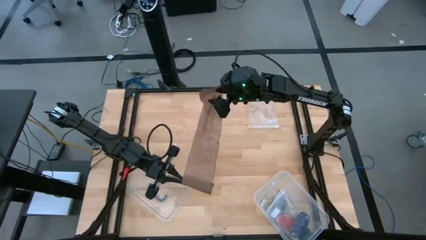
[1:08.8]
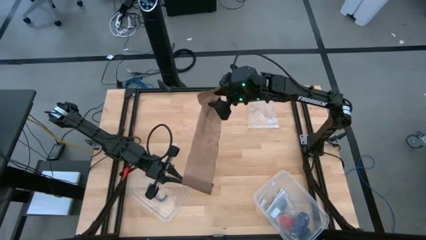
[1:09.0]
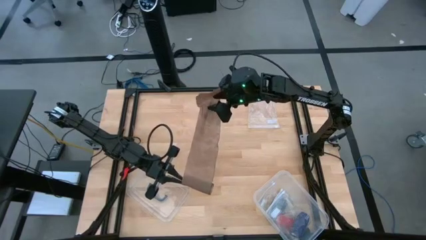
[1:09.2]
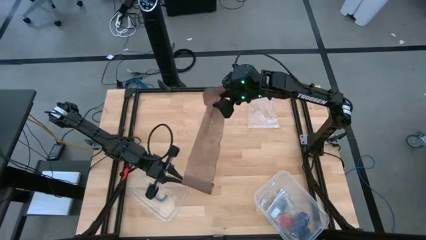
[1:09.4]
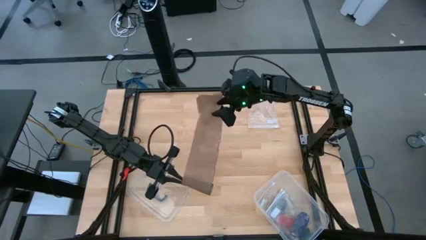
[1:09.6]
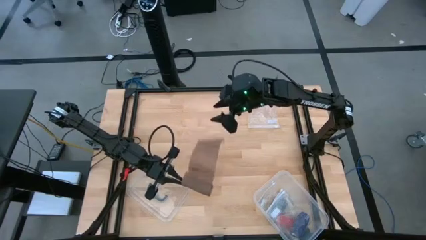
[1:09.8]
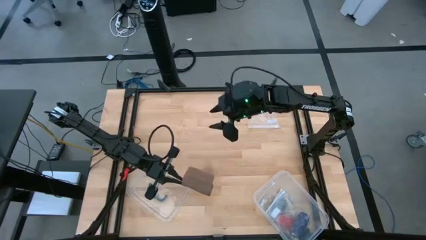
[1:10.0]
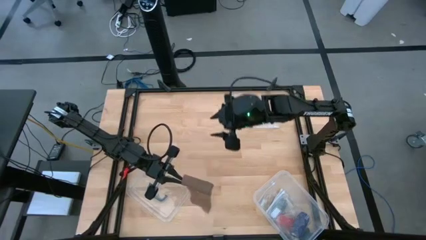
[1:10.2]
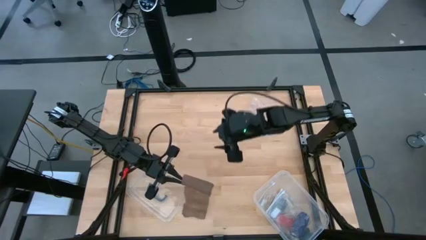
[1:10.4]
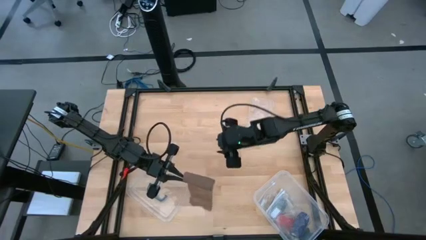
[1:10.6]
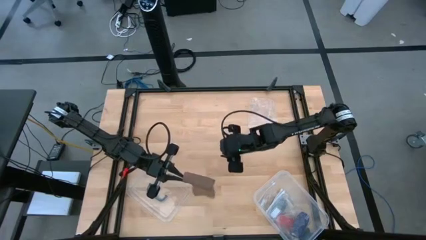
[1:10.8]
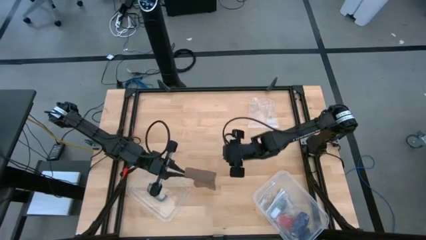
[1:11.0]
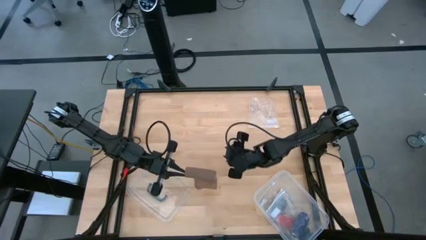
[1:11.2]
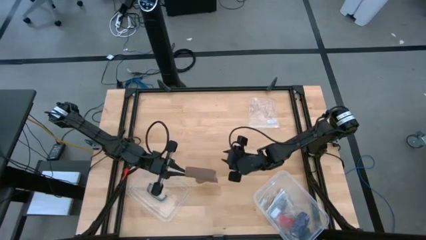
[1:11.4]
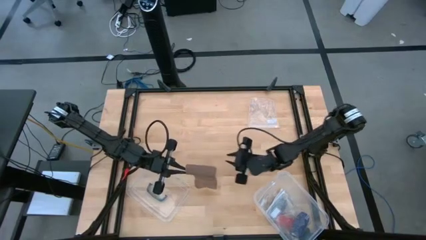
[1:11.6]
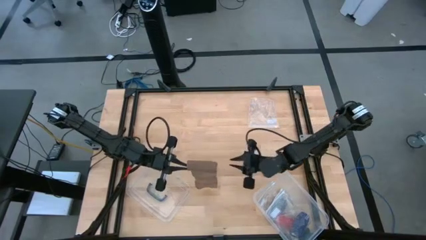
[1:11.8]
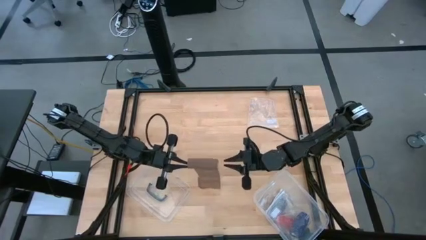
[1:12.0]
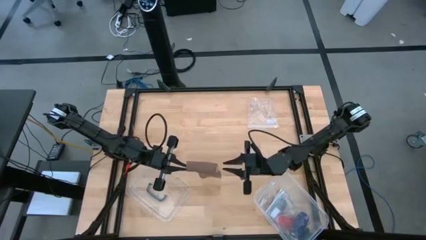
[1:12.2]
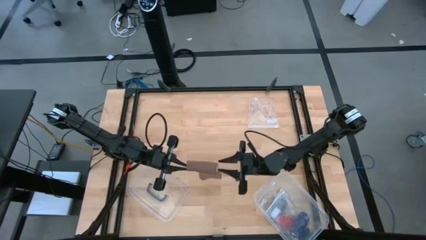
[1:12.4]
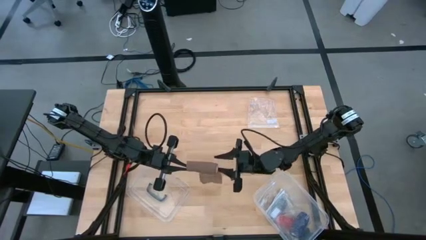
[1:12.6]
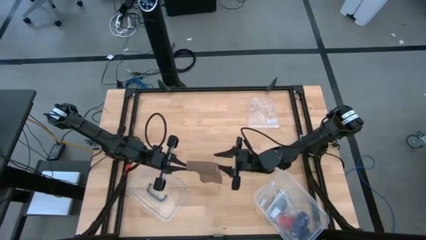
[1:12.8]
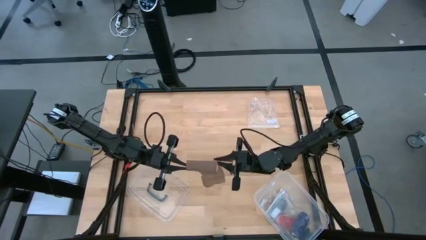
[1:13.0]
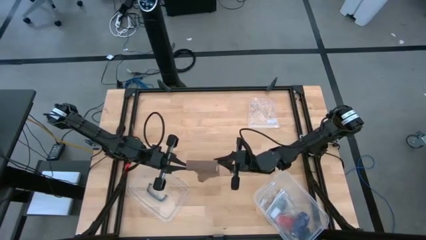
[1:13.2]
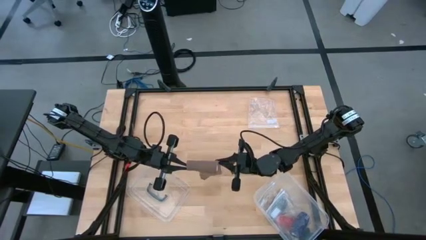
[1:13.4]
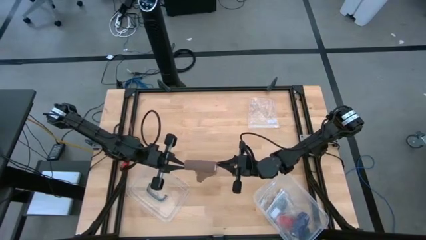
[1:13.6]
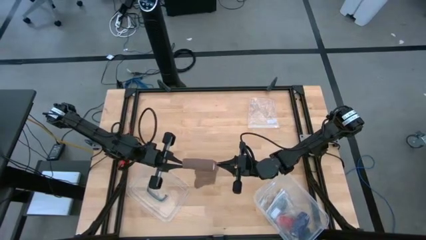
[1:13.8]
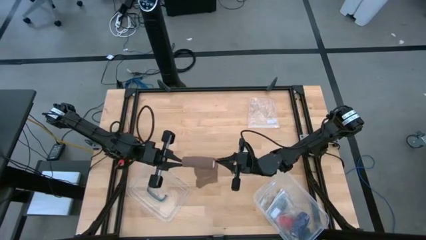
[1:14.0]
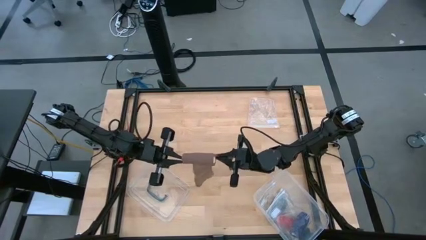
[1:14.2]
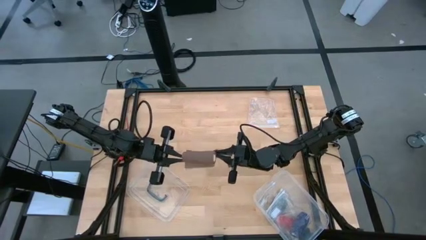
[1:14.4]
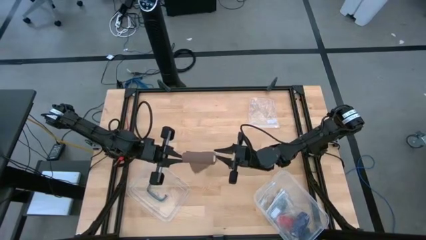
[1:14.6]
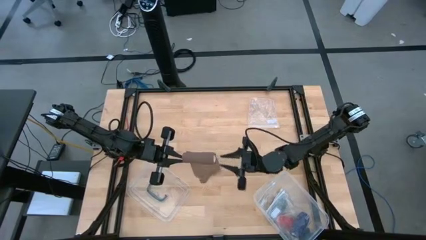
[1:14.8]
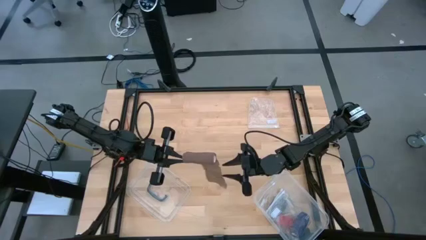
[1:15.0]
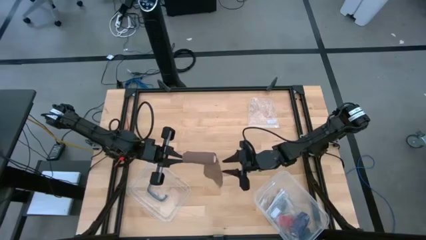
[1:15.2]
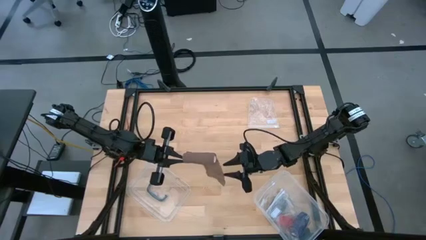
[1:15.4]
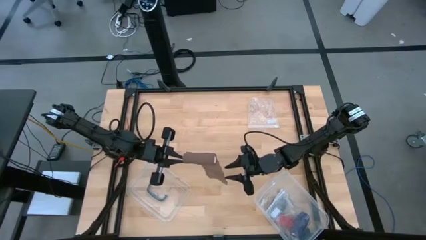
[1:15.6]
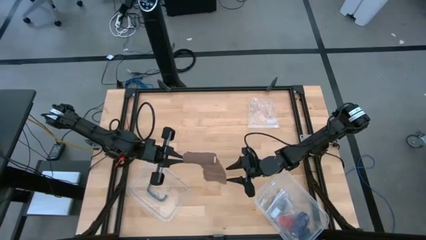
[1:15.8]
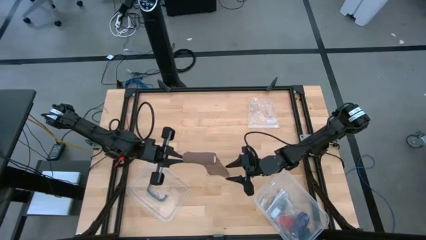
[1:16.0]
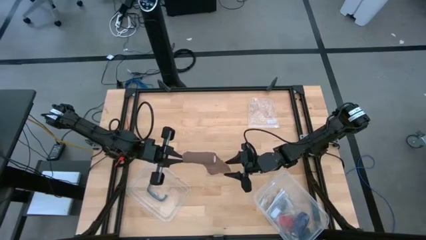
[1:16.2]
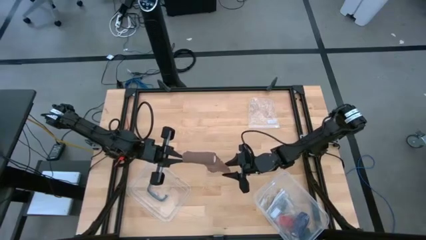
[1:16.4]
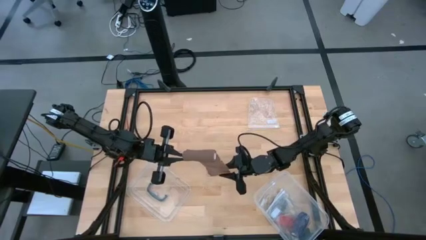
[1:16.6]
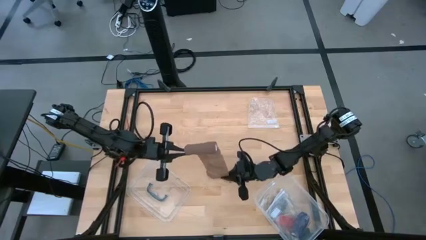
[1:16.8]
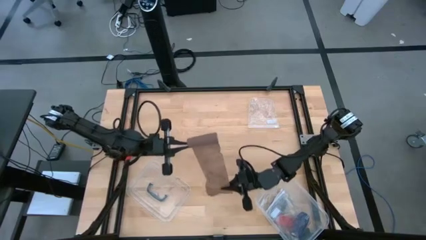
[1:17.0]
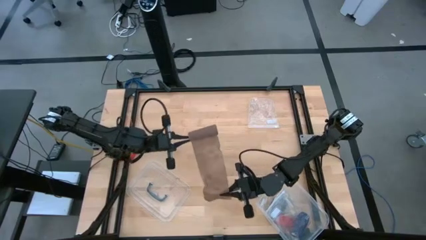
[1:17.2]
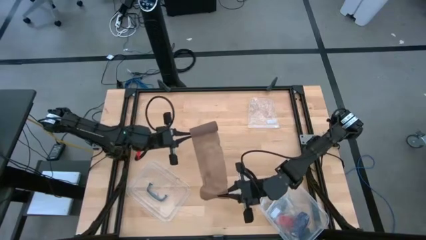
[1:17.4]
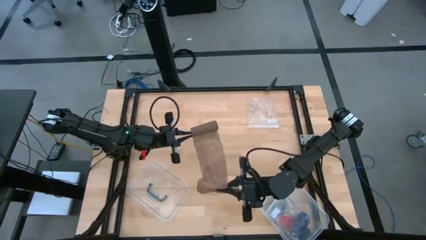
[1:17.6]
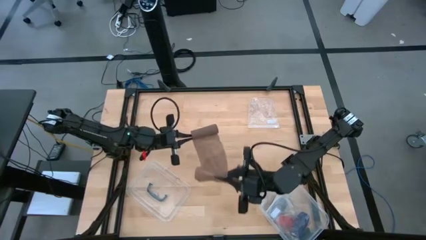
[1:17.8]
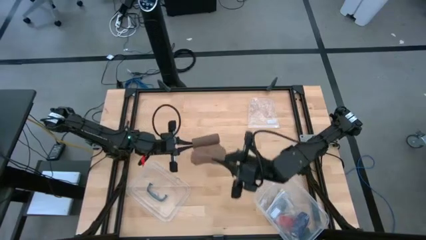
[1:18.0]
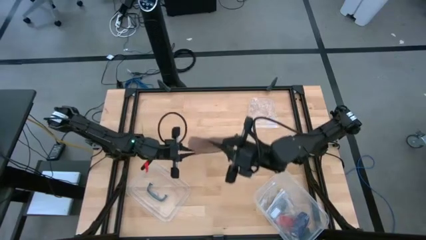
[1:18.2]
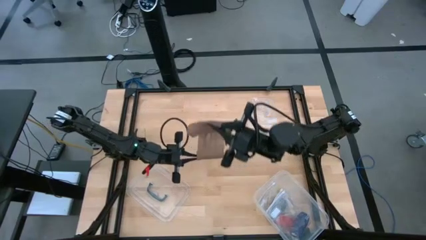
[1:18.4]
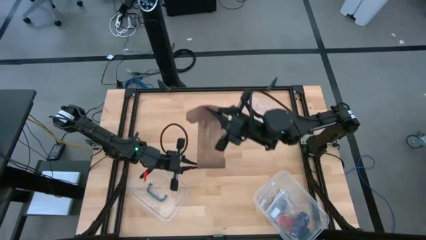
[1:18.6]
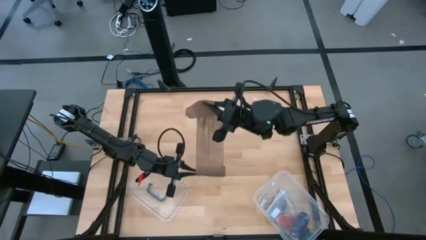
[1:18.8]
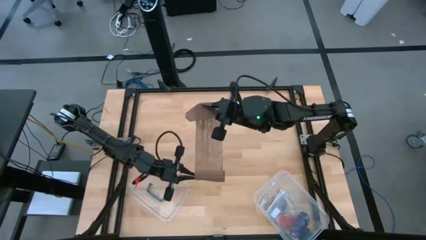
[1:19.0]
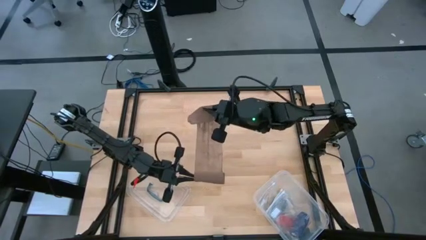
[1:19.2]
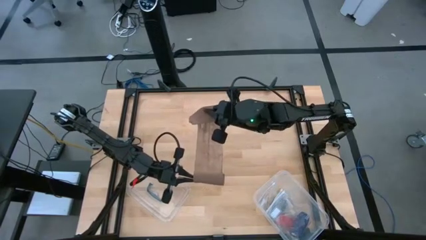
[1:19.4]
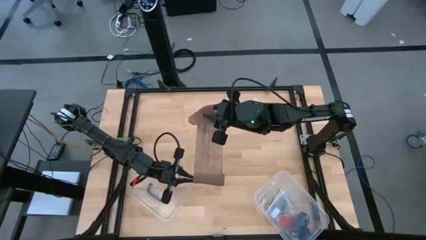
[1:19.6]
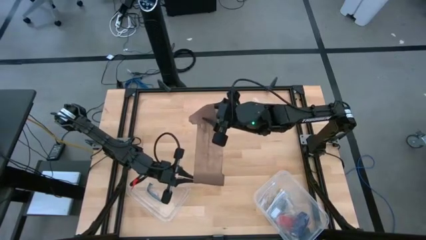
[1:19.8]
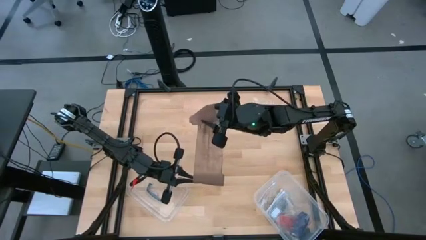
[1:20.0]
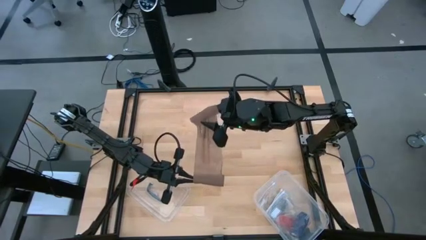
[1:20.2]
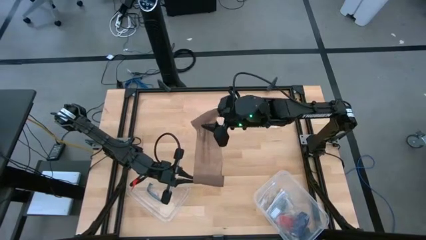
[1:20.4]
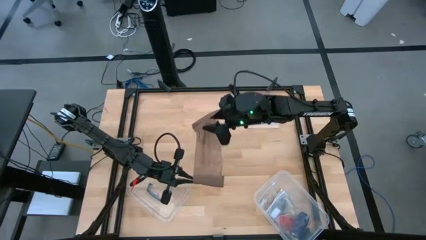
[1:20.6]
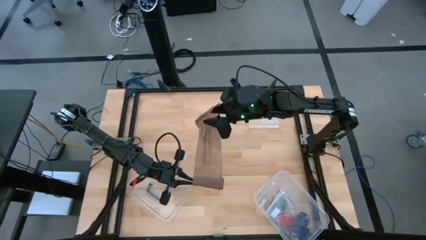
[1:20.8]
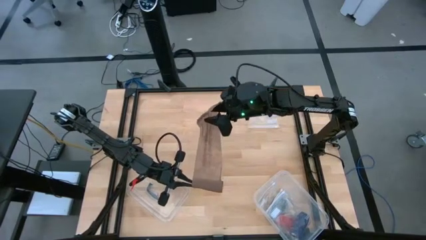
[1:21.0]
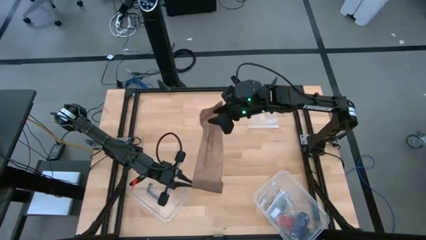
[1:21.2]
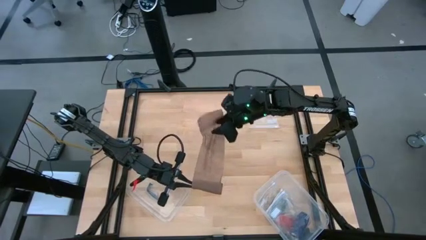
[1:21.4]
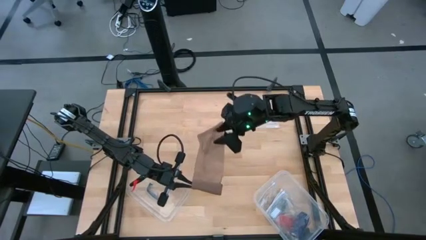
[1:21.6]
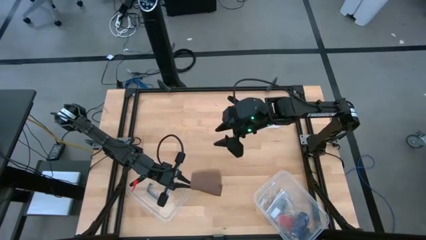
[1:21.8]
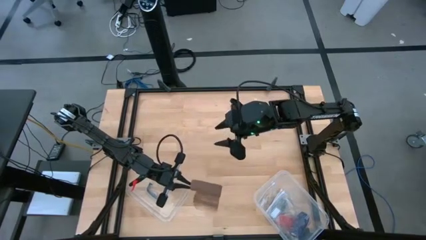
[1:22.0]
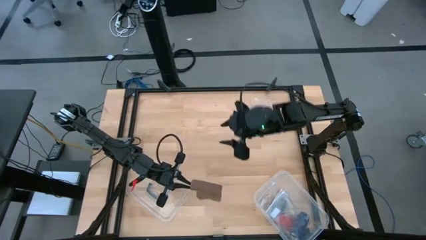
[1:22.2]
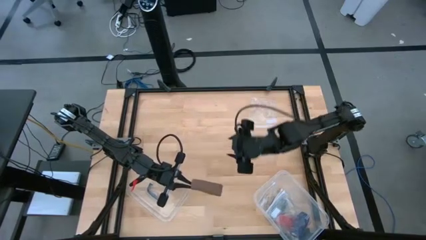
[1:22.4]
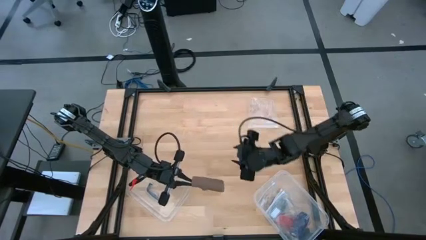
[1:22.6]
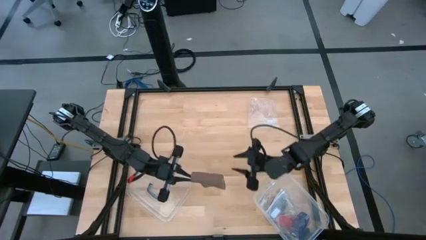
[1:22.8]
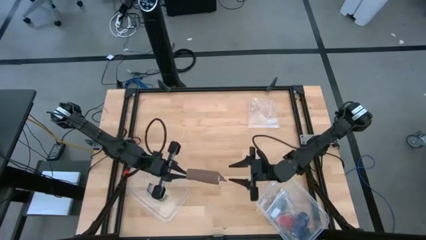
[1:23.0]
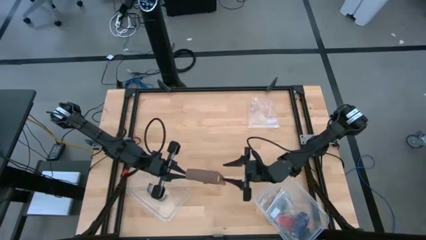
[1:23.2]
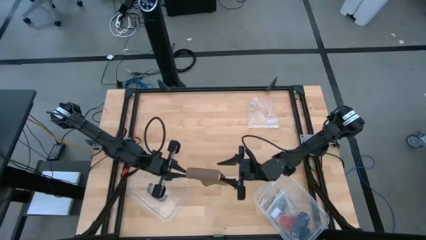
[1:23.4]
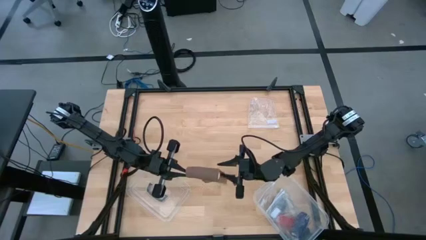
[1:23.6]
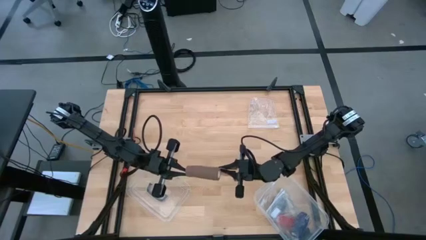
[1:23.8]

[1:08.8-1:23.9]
Task: Roll bandage
Roll the brown bandage

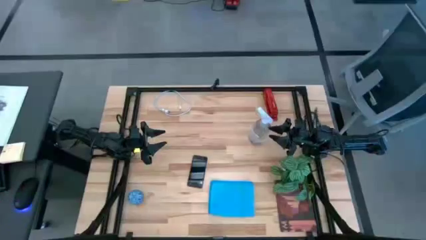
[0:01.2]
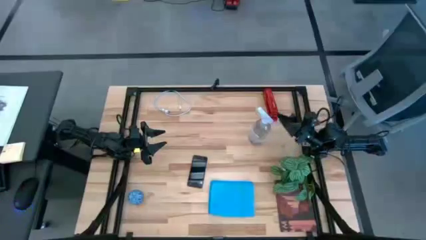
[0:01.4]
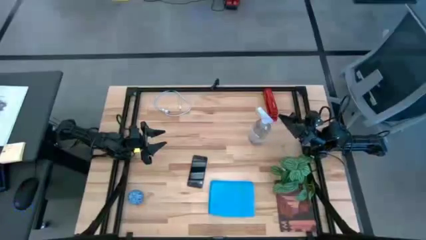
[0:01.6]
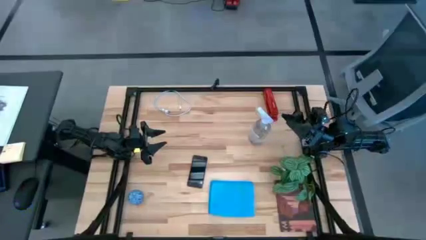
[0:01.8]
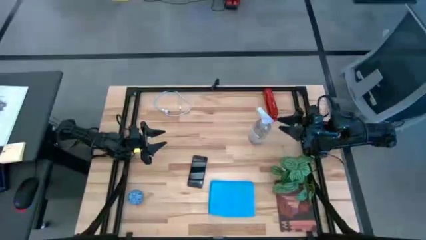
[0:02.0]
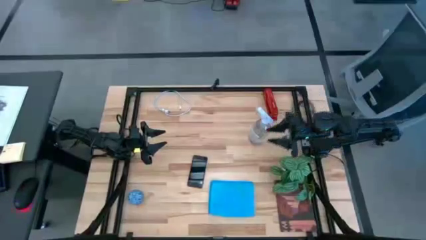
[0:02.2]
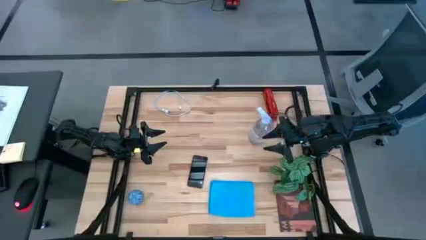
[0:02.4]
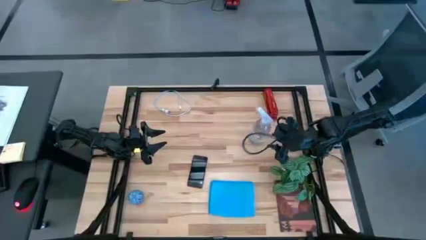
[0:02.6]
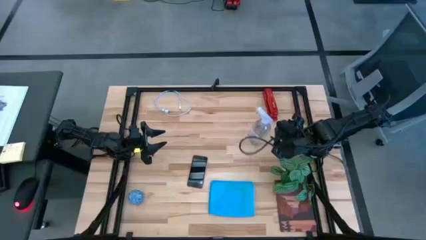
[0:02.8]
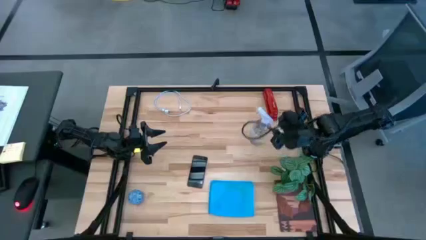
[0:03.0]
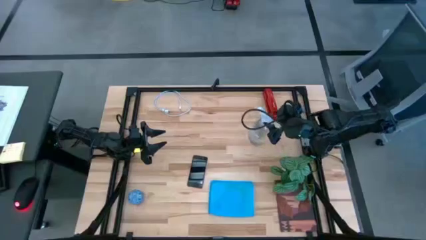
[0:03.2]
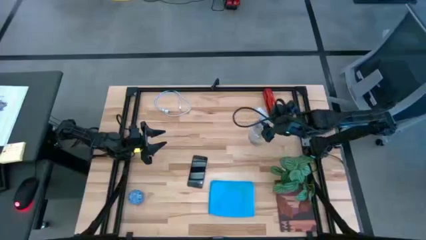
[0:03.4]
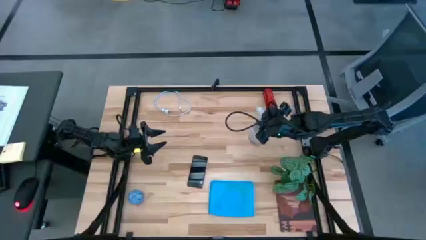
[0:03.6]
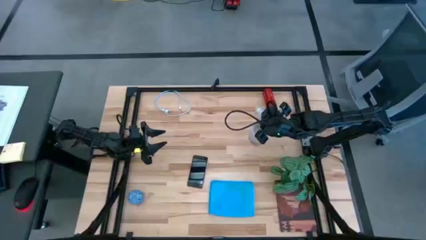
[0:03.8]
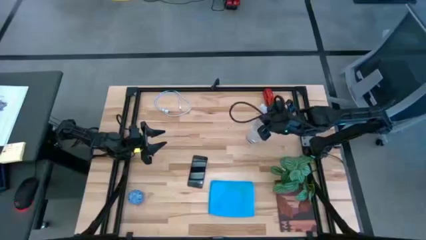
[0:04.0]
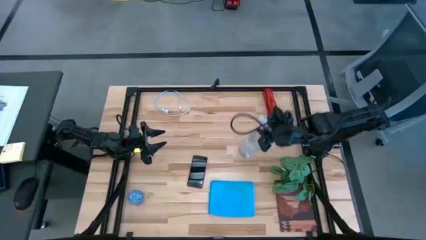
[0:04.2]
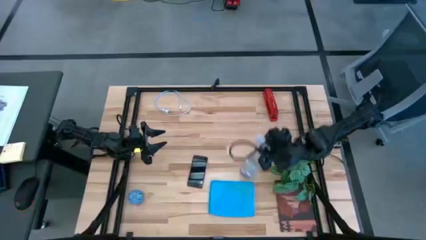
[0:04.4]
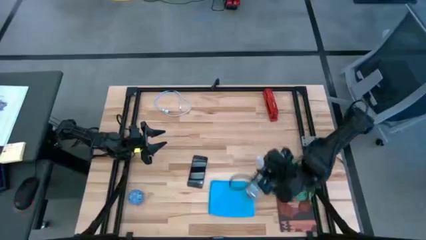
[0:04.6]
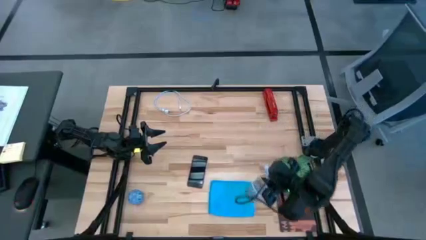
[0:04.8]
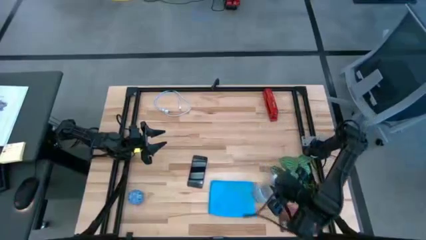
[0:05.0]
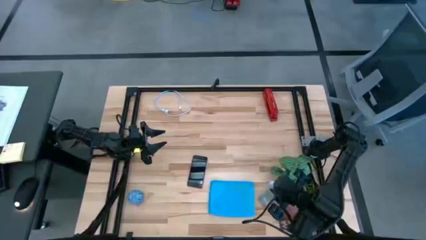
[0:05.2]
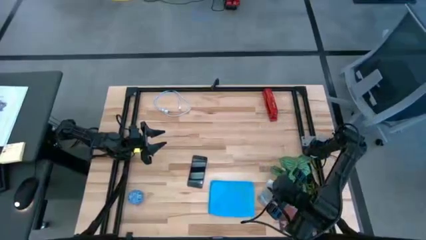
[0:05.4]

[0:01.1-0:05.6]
Task: Apply microfiber cloth
Move the spray cleaning bottle to the bottom right
